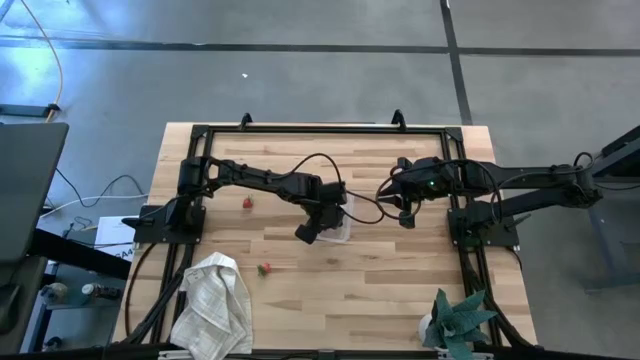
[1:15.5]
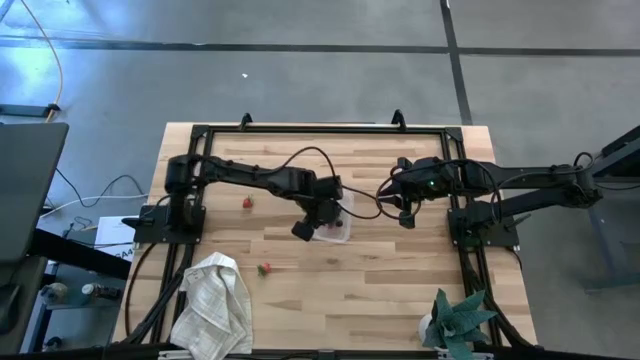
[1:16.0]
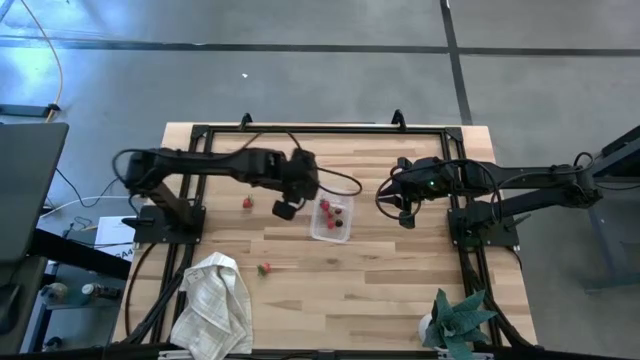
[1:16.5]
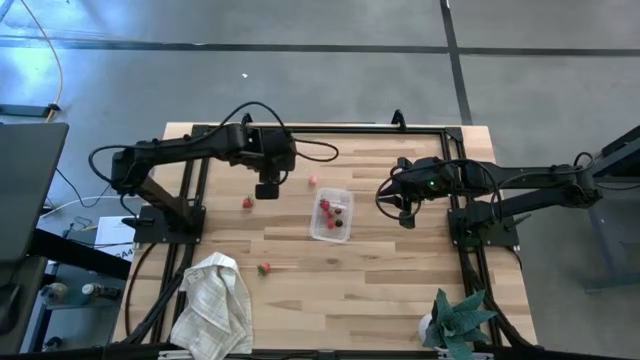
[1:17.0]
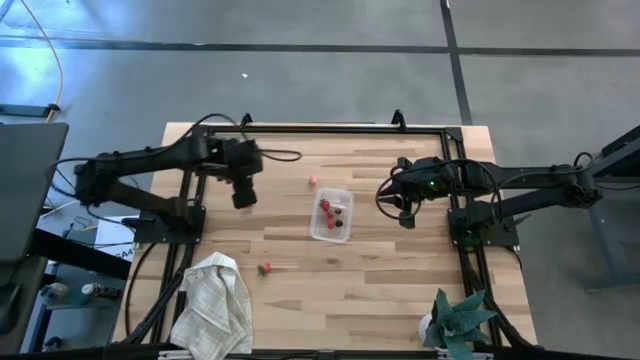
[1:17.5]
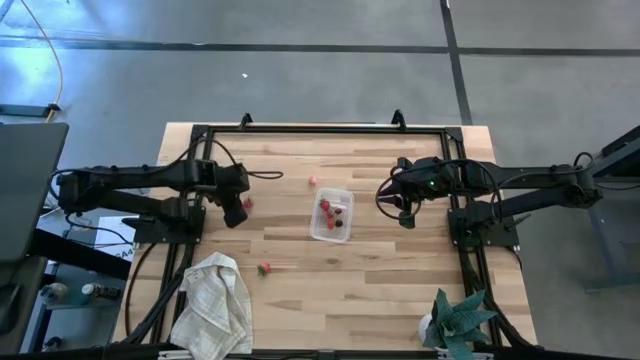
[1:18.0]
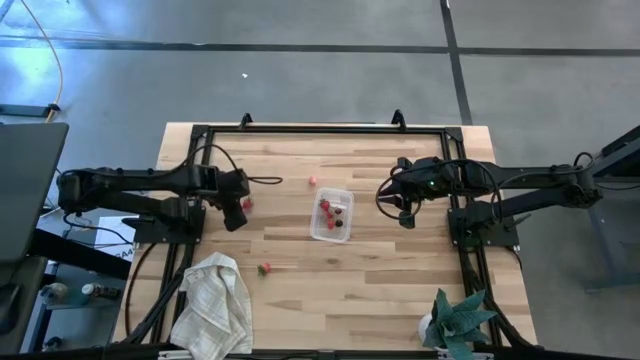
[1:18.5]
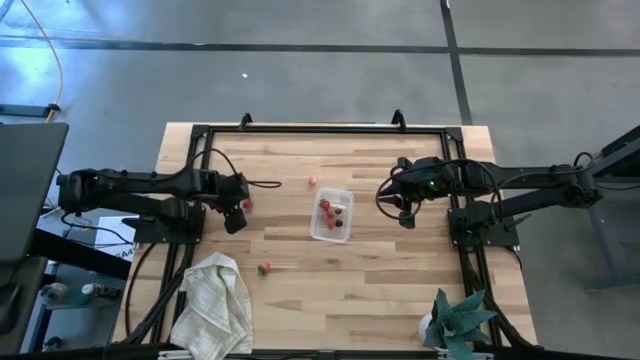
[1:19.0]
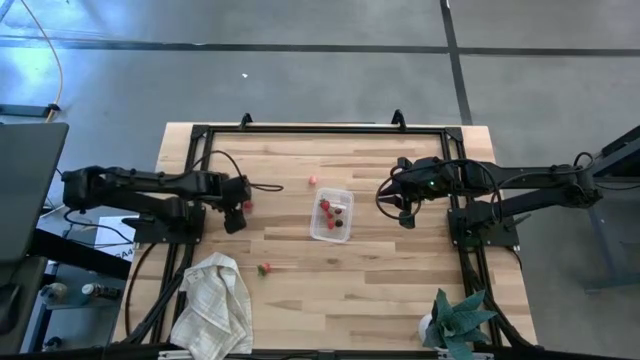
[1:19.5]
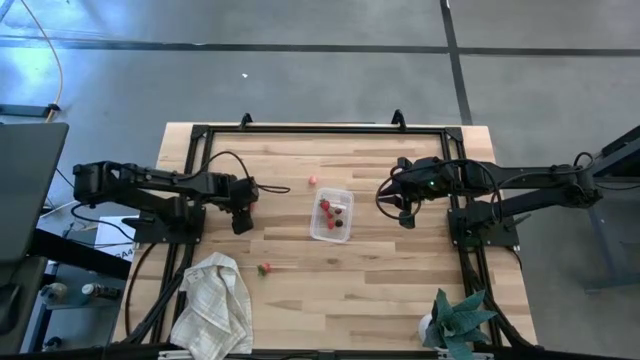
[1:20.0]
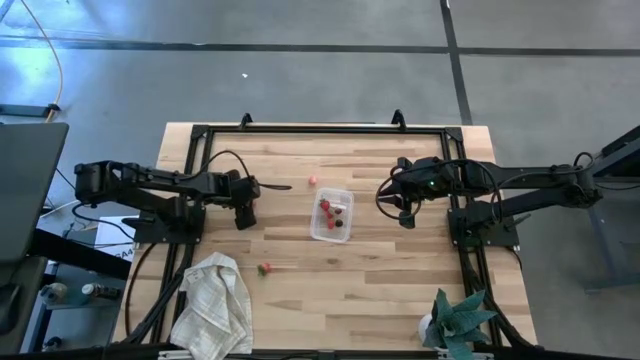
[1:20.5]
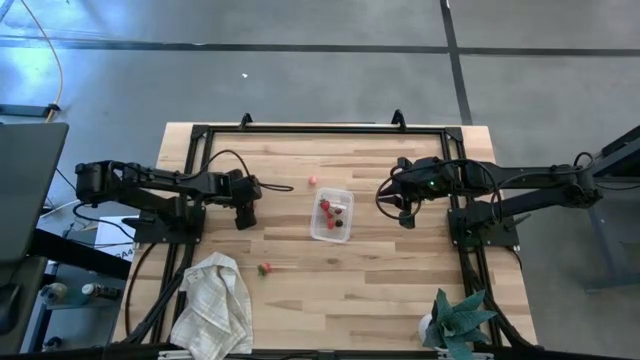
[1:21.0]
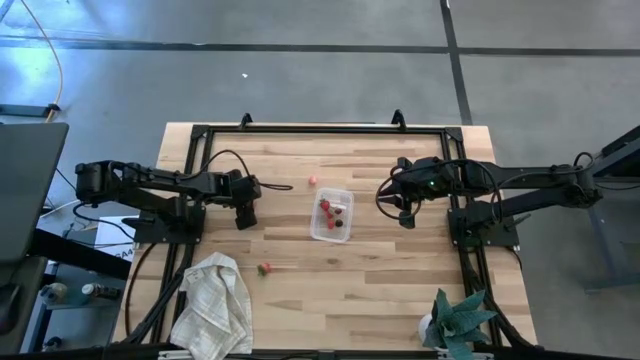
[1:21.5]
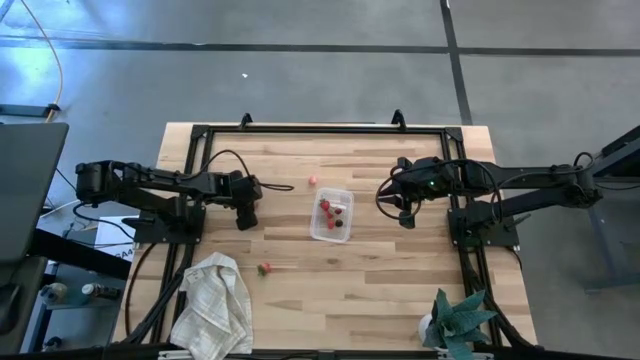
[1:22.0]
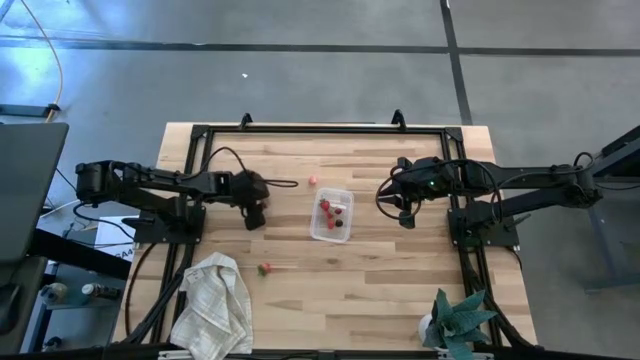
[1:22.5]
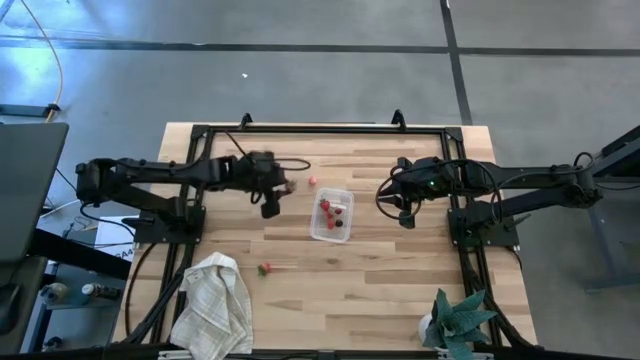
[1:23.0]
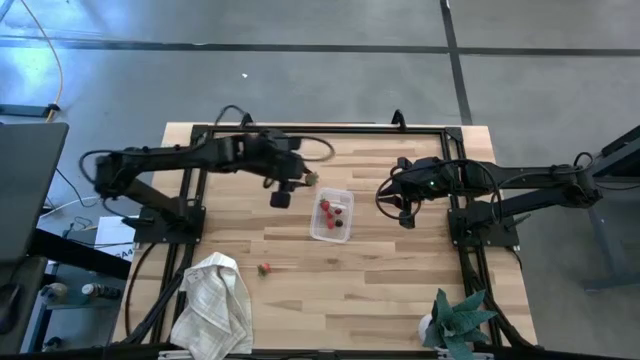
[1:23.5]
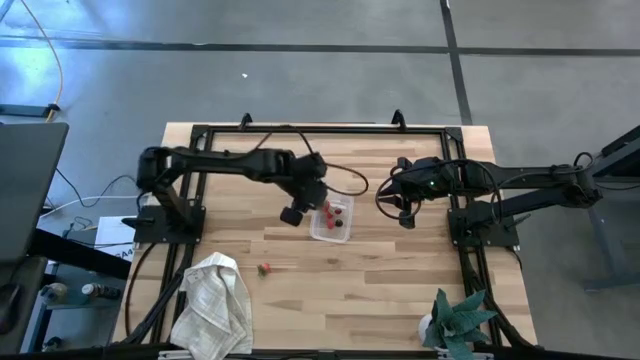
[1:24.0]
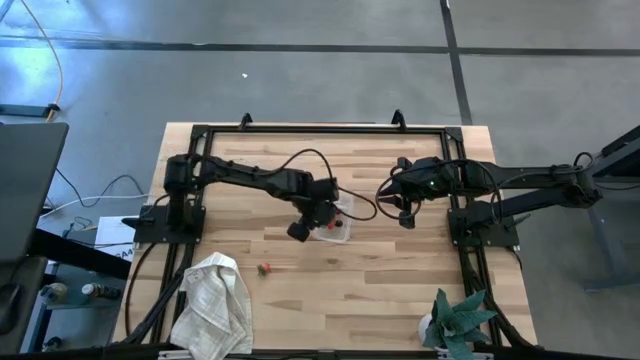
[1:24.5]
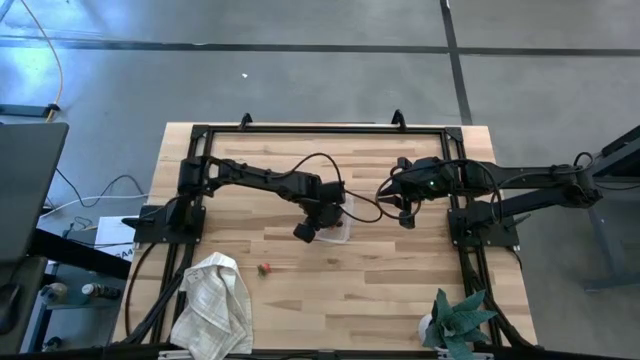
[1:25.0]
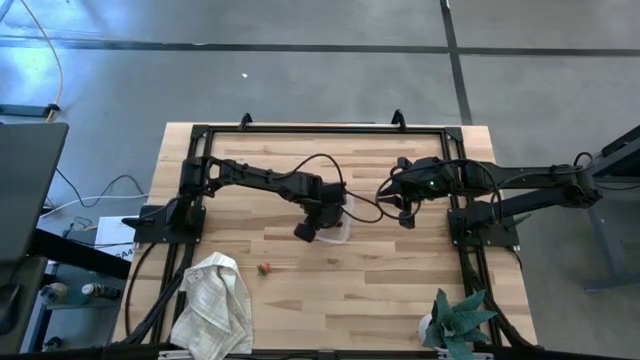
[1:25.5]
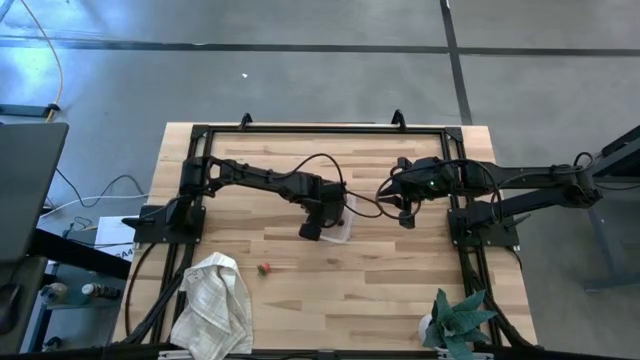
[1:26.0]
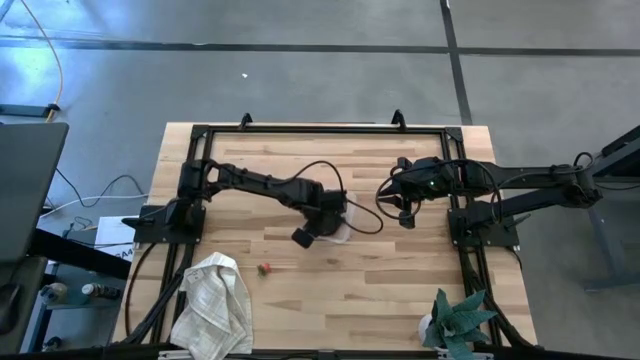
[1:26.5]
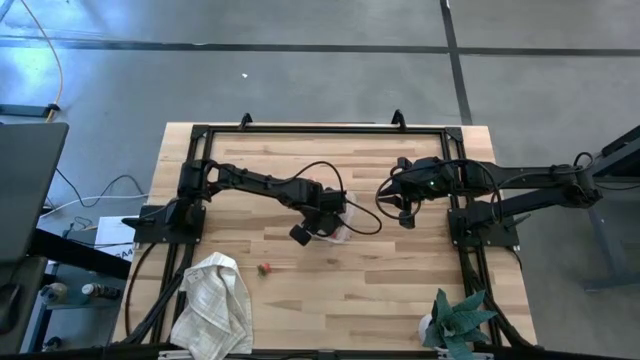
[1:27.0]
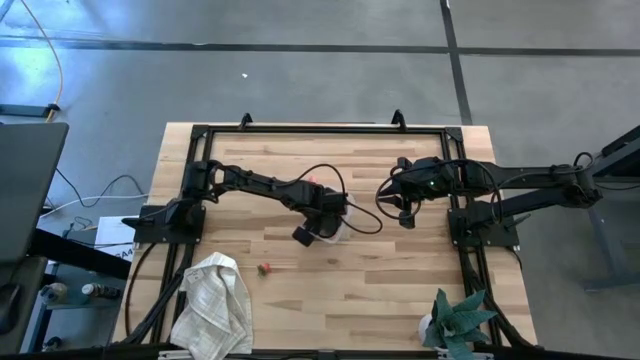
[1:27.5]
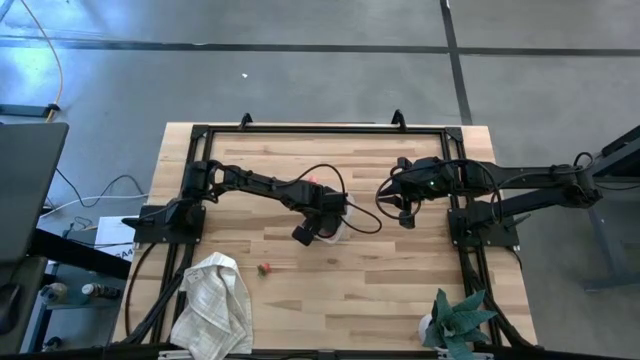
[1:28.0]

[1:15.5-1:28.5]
Task: Pick and placing Produce into tupperware
Put the strawberry into the transparent bin

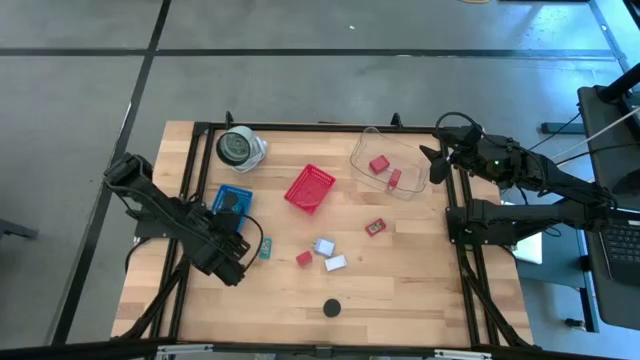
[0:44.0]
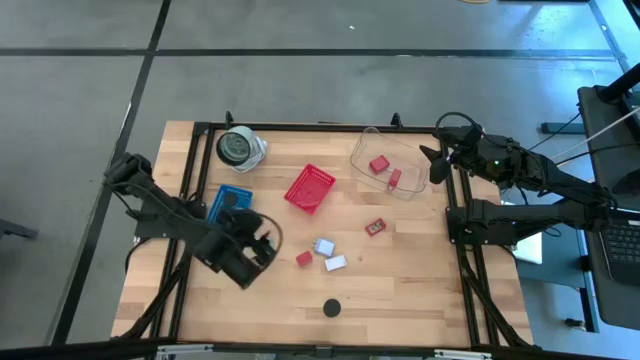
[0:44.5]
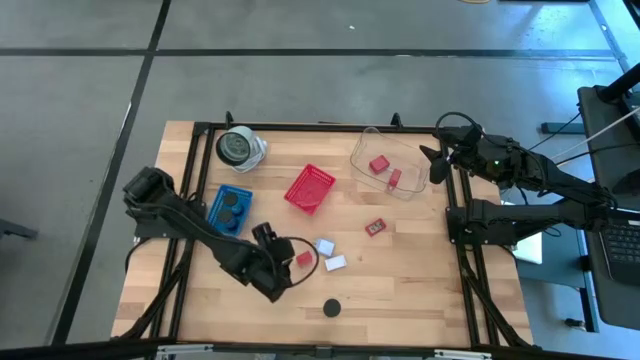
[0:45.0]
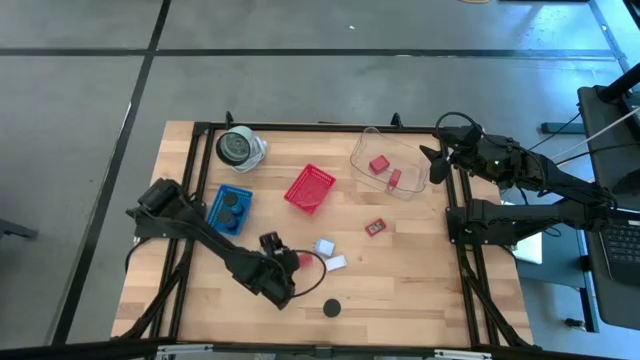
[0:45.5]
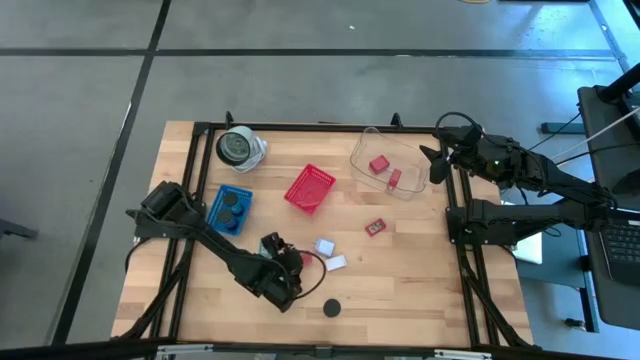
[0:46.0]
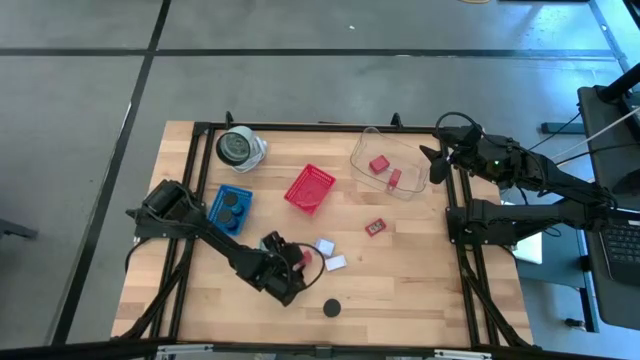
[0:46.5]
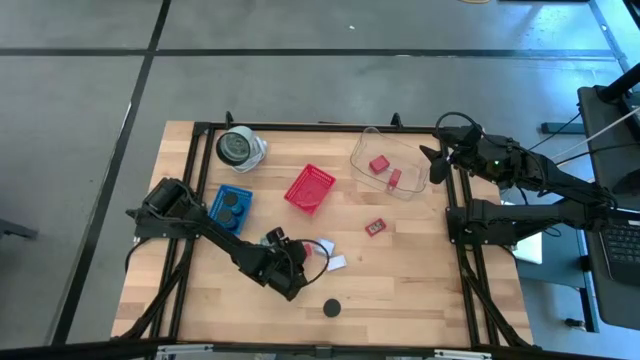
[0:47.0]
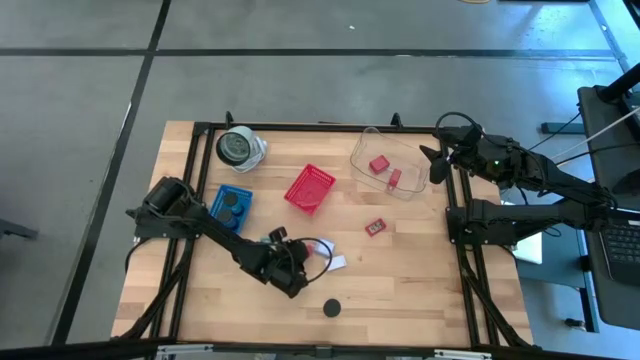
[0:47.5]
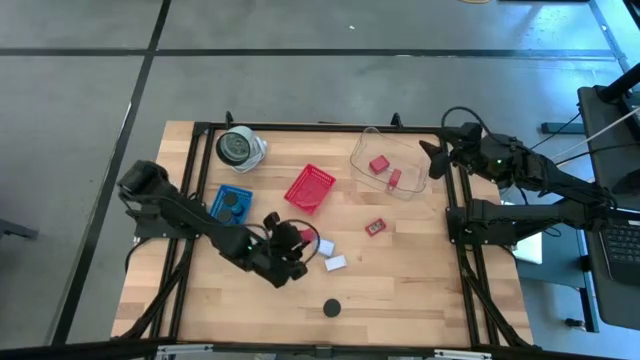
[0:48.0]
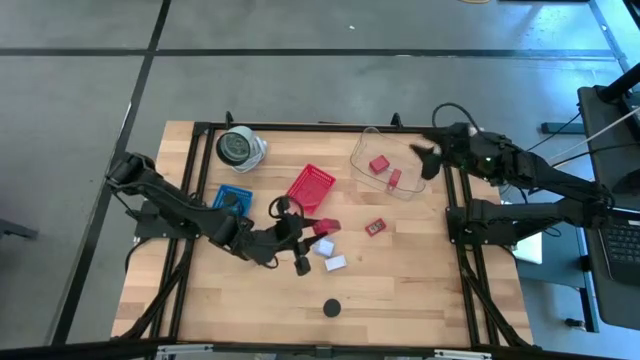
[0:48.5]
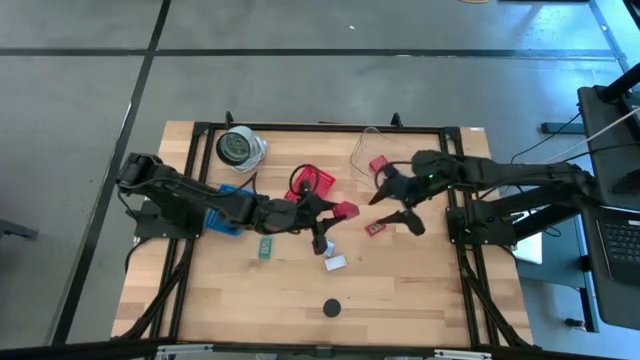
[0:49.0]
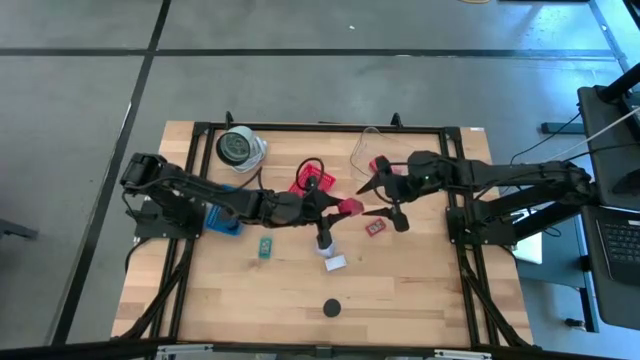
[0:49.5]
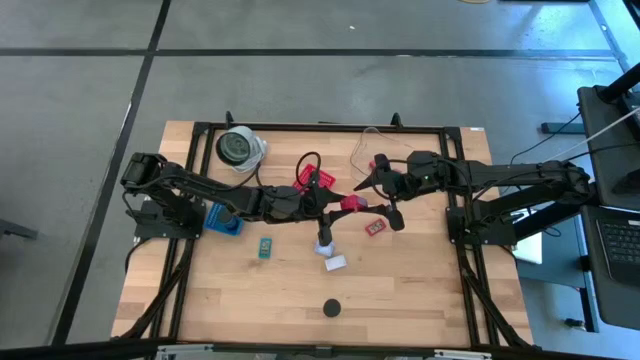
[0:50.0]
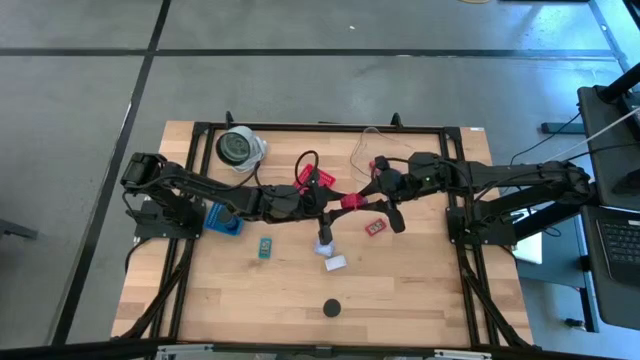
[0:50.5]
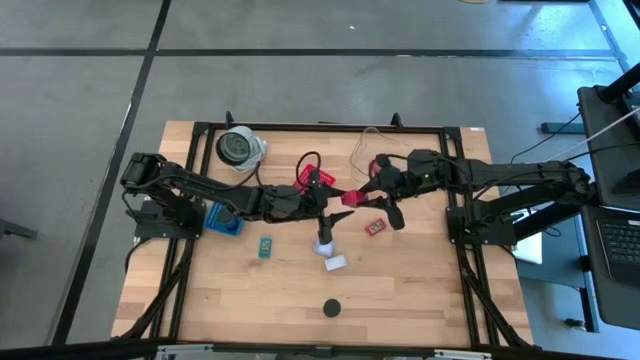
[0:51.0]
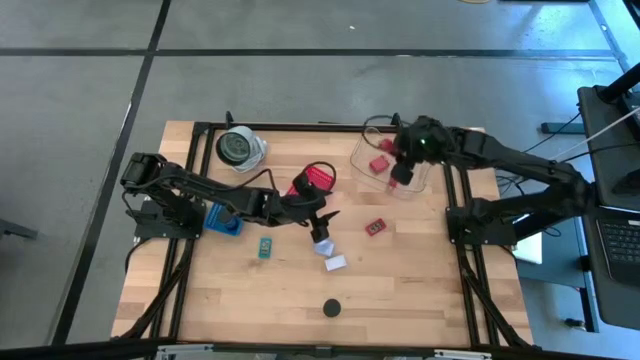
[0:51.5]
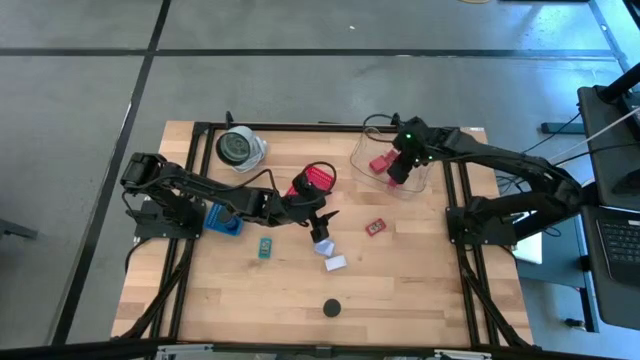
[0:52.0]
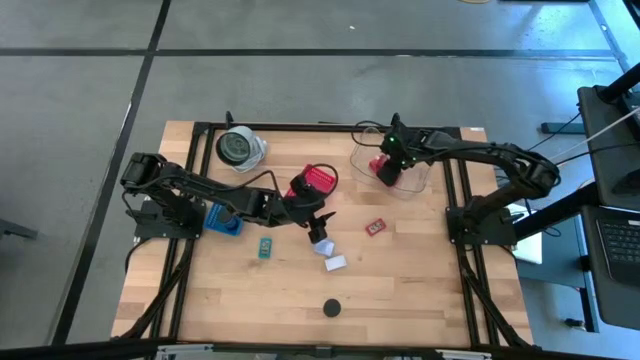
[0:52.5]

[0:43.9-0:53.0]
Task: Pick & Place Office items
Put the red charger adapter into the white bin
